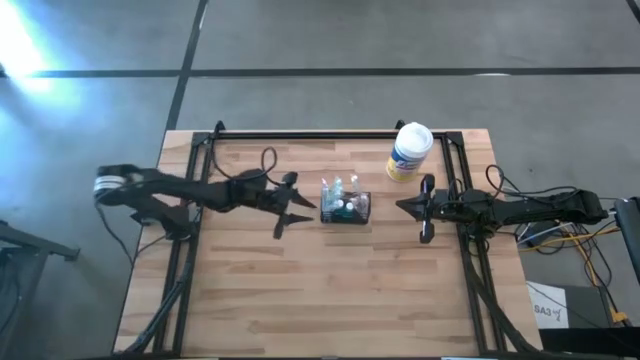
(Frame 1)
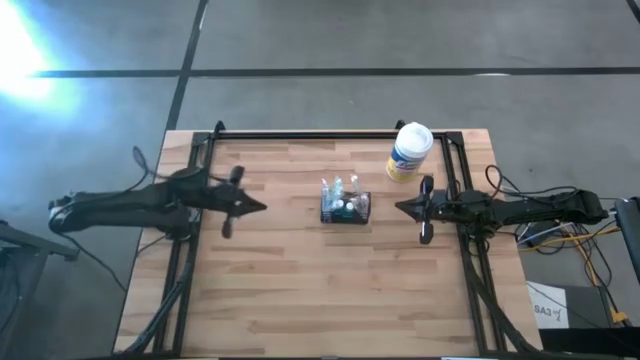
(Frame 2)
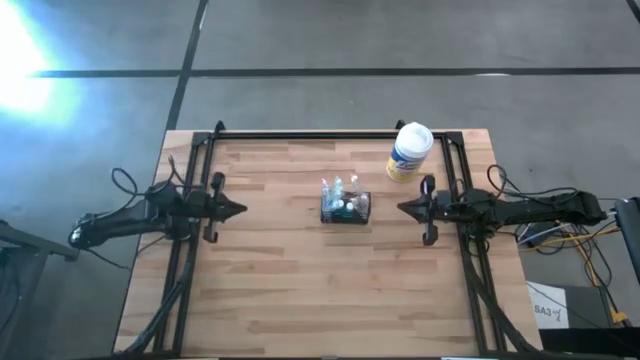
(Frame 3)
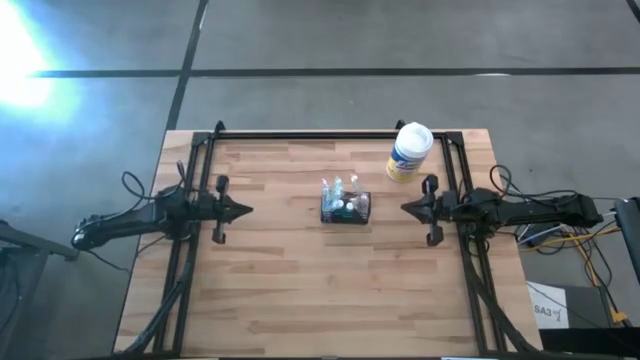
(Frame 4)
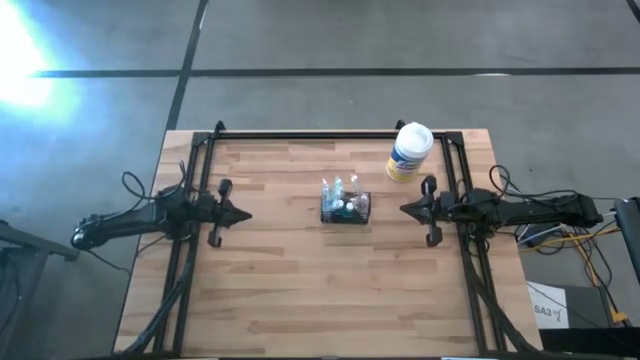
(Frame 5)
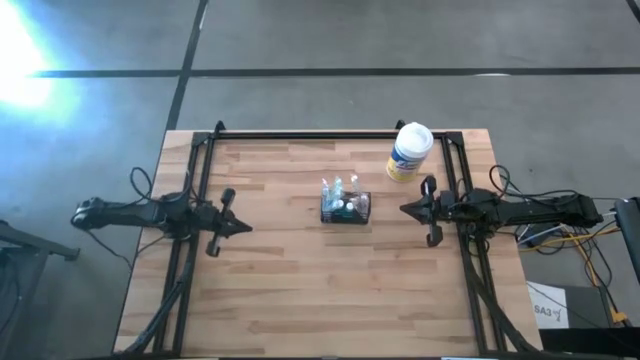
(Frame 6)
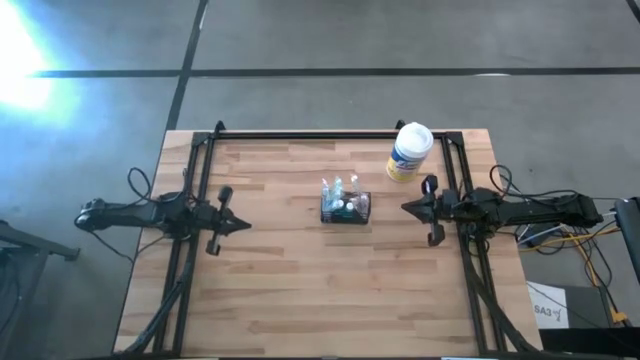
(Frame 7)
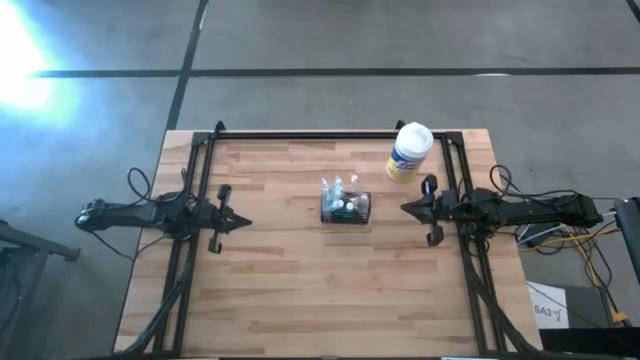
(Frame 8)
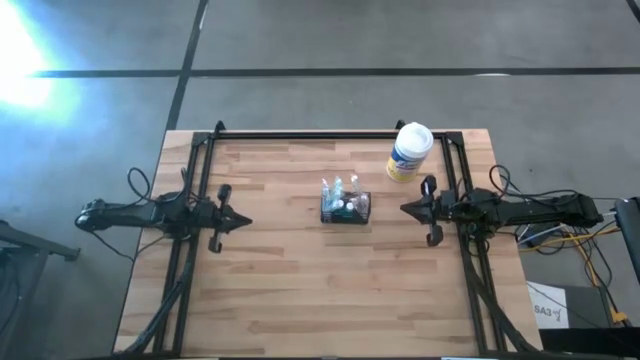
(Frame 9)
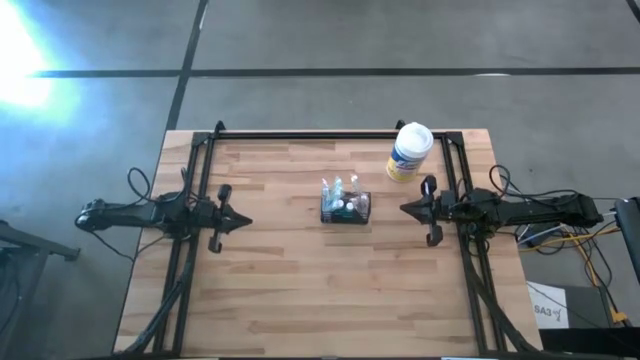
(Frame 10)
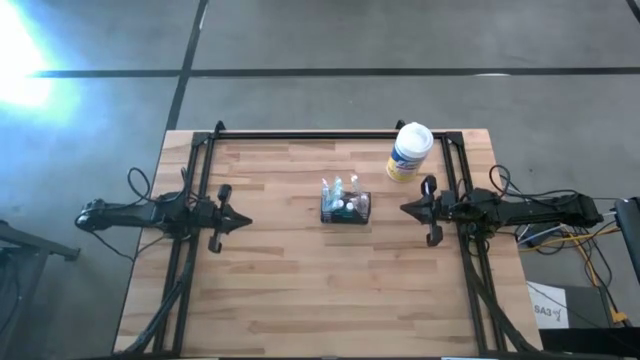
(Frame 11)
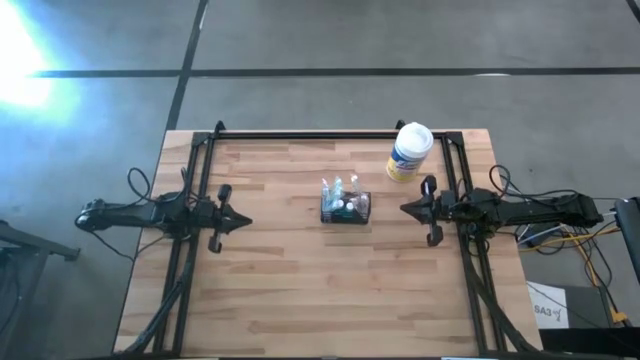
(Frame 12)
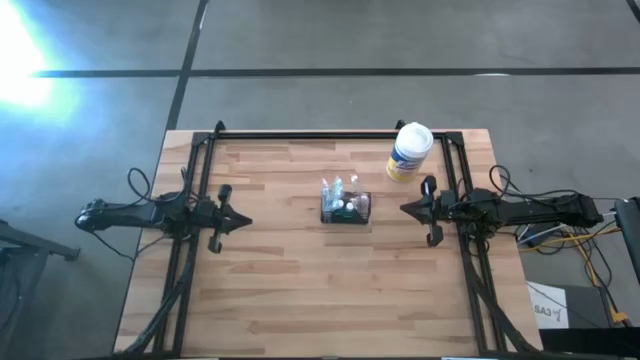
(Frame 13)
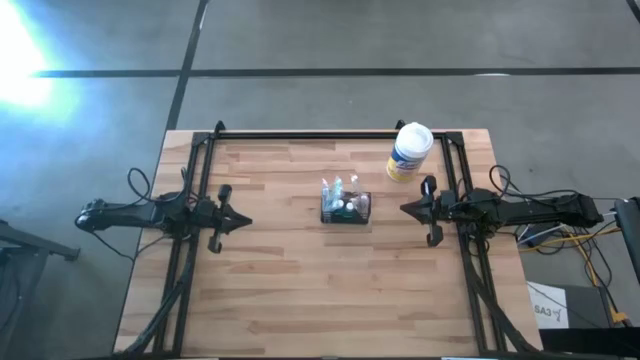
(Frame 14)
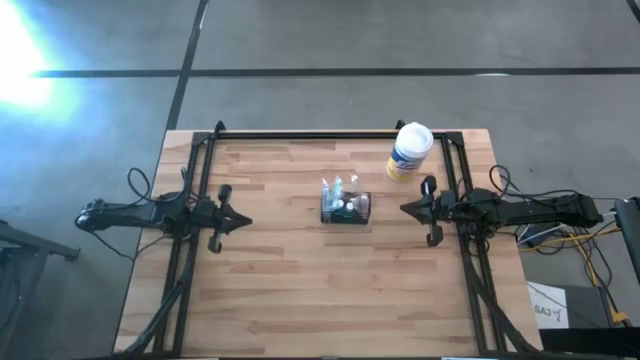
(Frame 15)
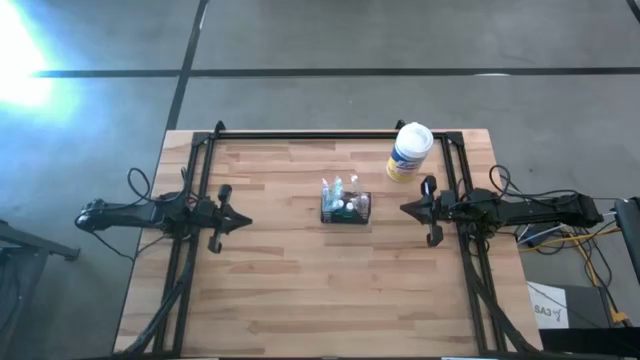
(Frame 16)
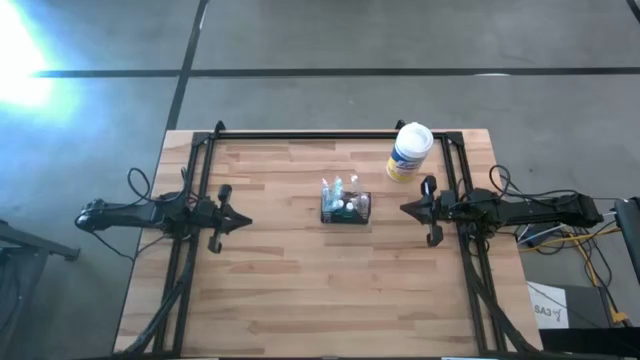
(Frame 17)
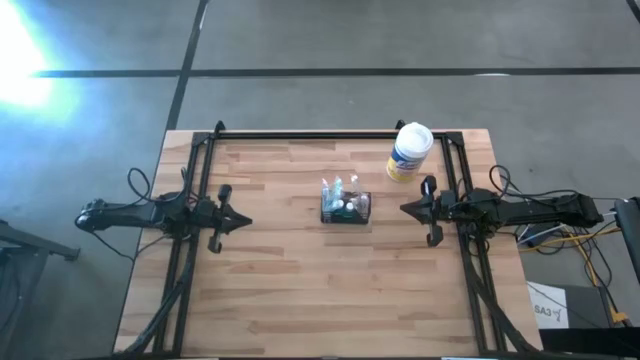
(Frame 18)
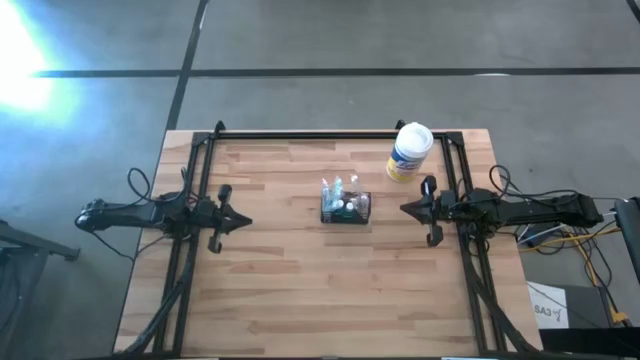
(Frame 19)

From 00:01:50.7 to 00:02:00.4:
Task: Pick & Place toothbrushing station
Return to Home Position

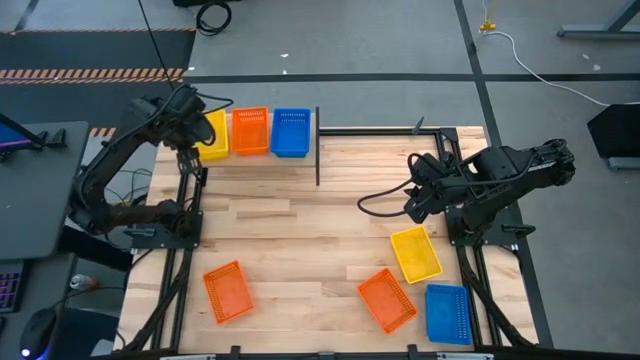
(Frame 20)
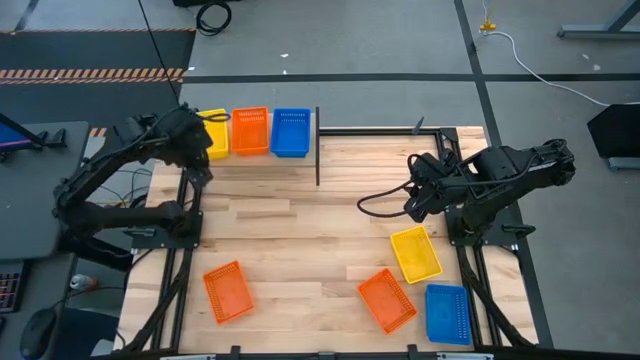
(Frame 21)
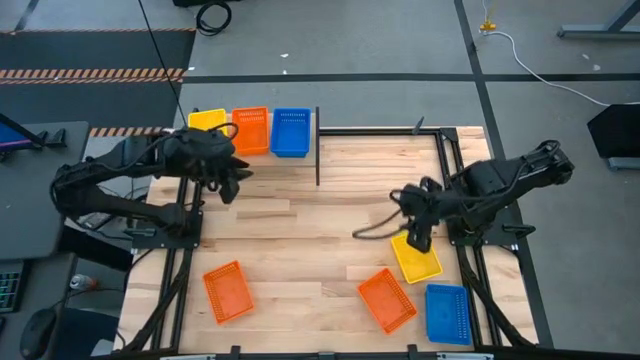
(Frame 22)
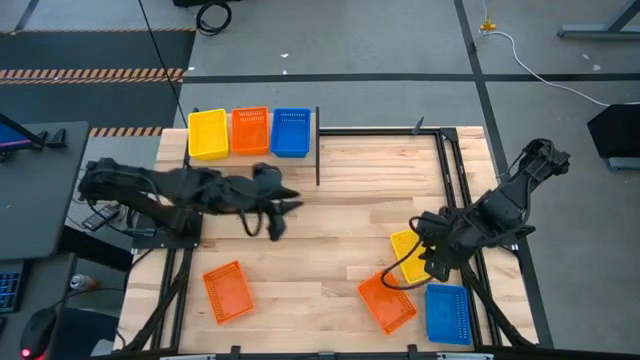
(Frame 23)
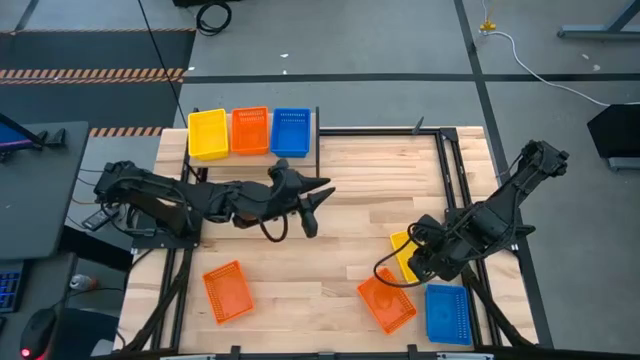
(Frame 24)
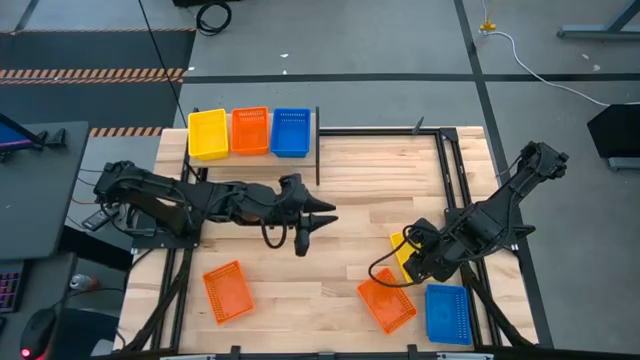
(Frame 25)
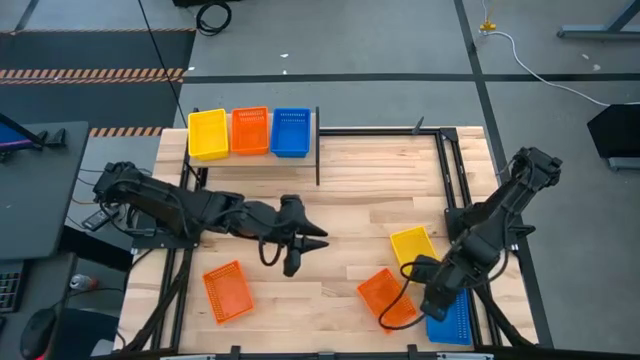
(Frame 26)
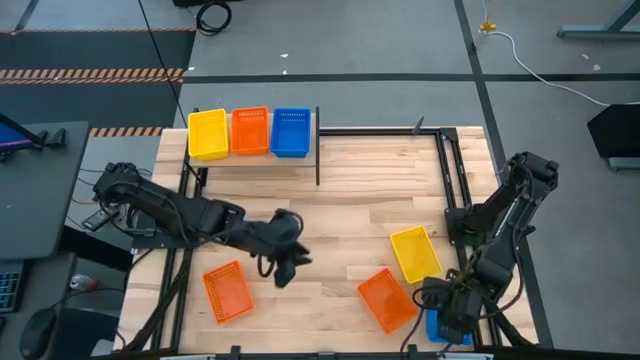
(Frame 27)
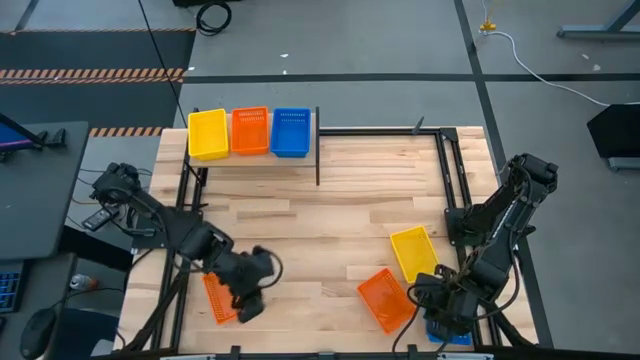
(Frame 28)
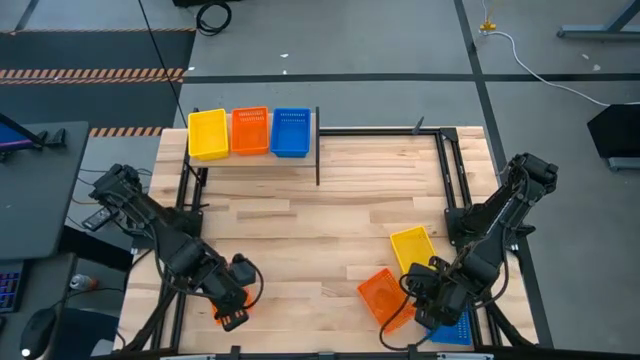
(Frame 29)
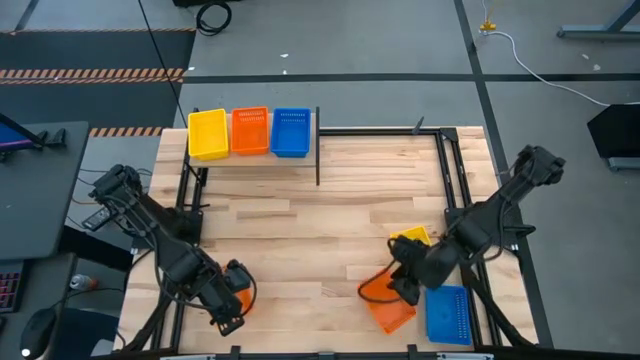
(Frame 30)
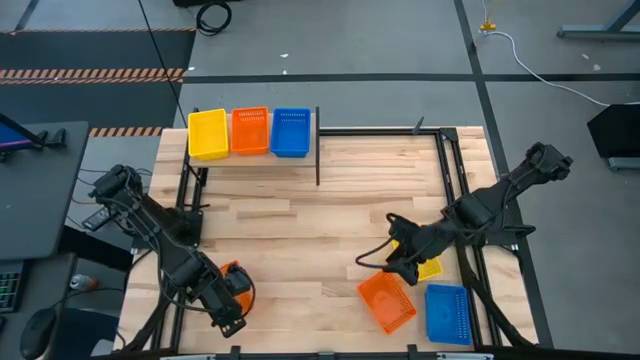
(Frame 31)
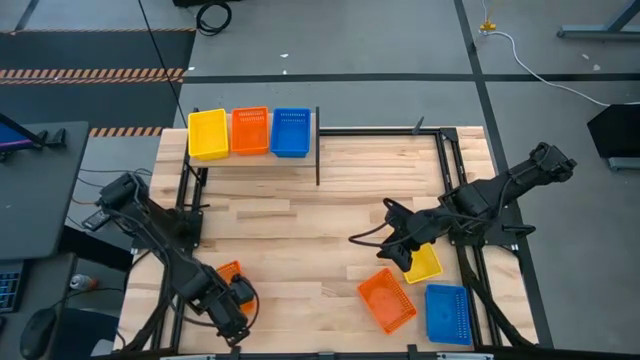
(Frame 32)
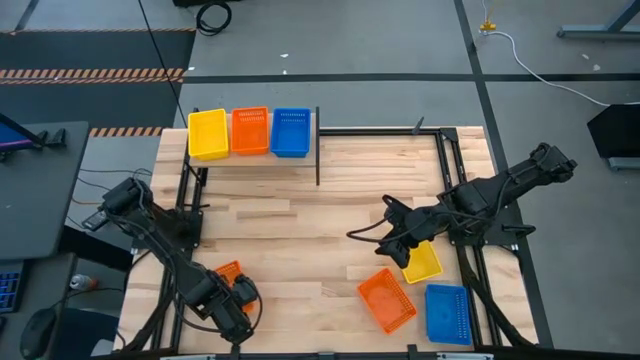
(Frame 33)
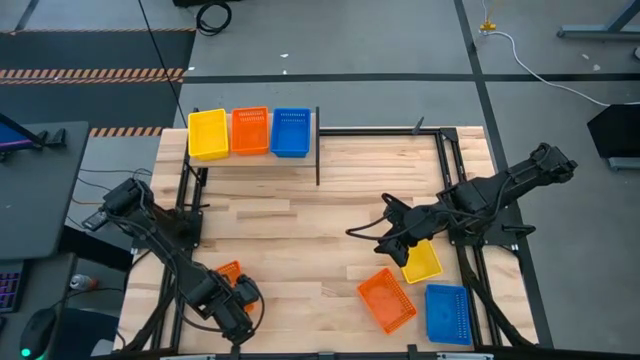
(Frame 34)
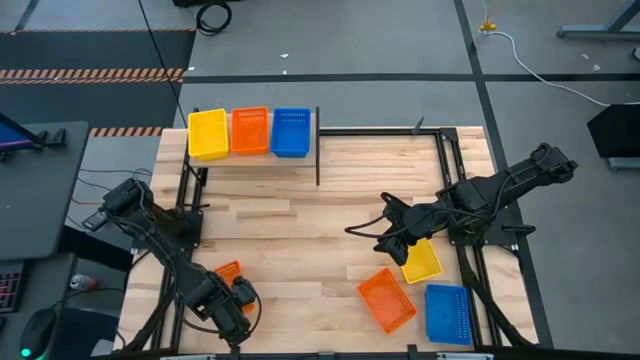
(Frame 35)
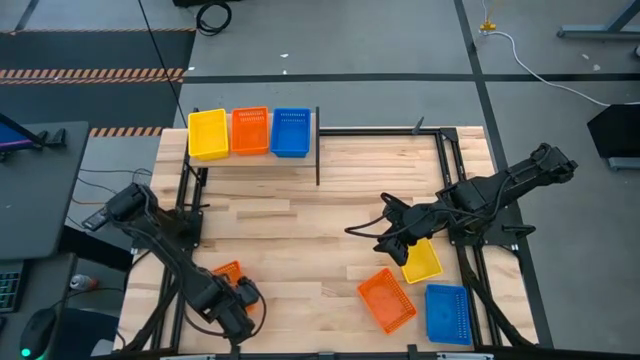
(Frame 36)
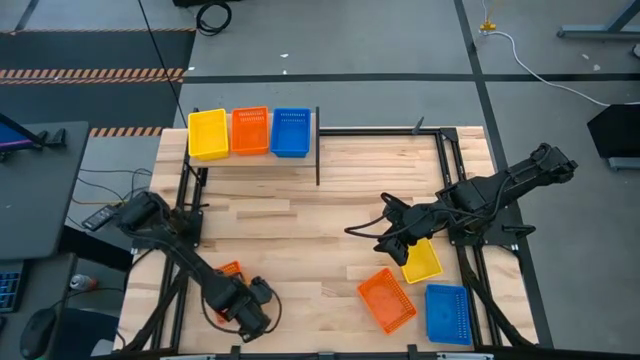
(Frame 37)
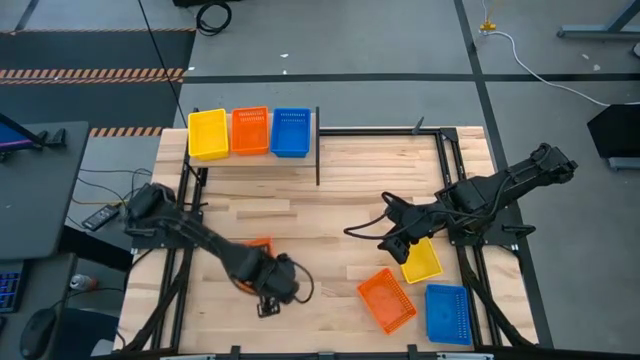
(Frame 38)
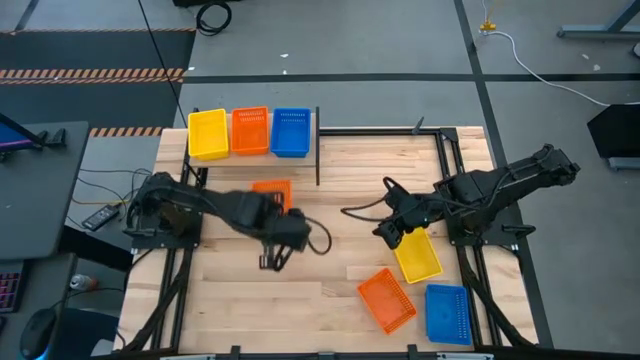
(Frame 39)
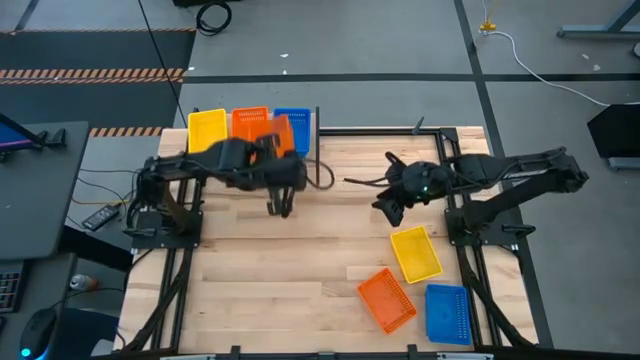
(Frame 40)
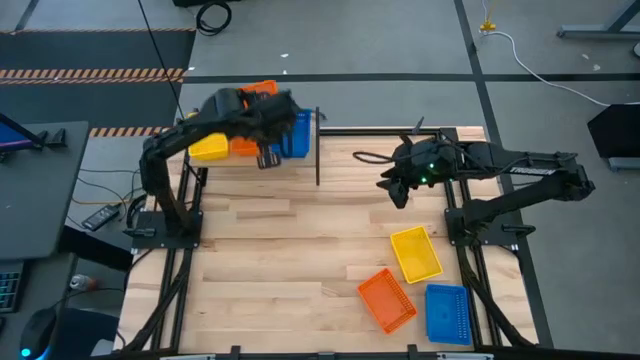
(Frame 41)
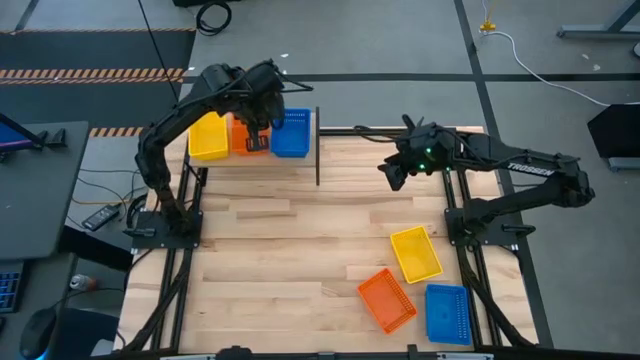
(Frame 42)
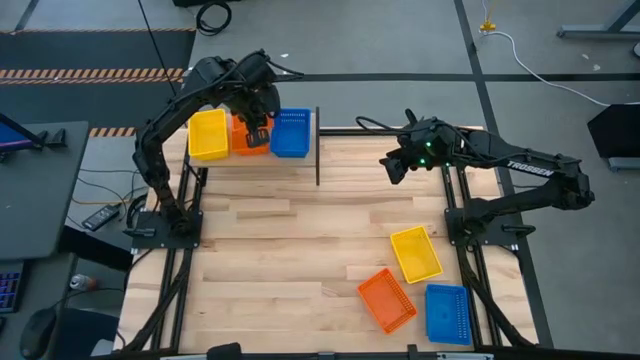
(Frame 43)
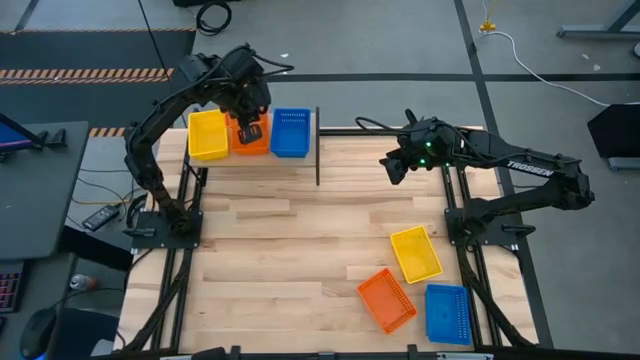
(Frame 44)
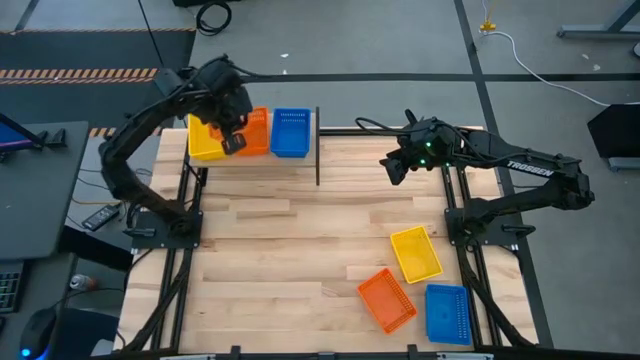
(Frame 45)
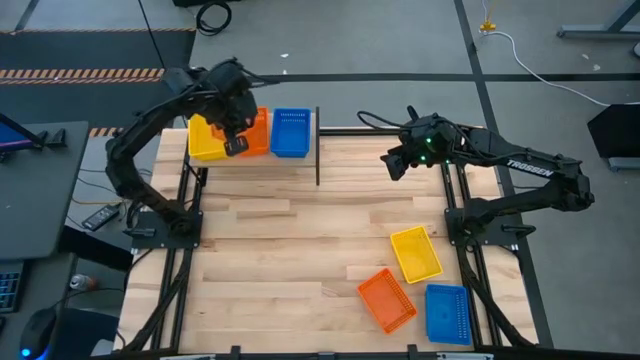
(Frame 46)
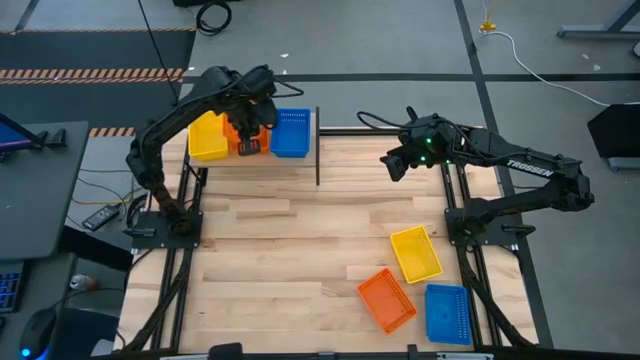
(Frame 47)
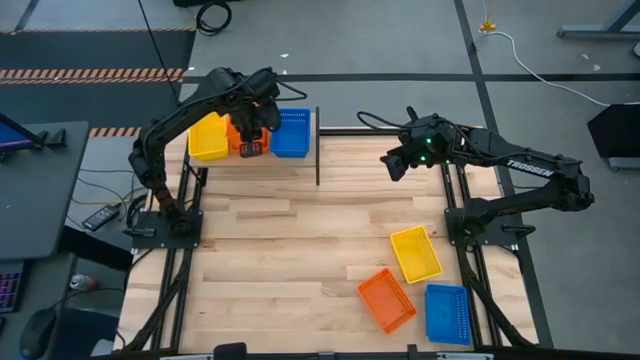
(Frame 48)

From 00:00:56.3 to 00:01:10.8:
Task: Stack baskets on shelf by color
Stack the left orange bin on top of the orange bin on the shelf
